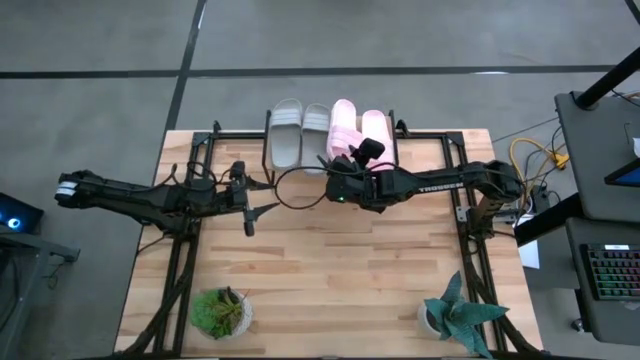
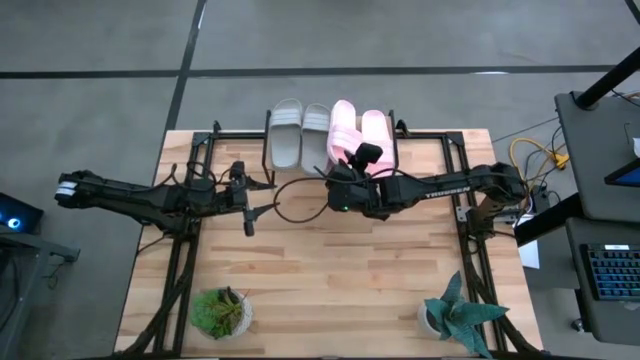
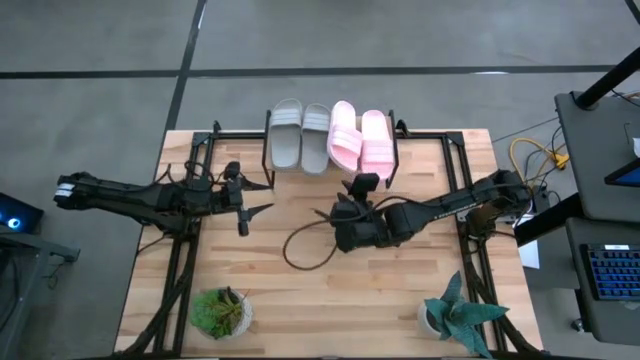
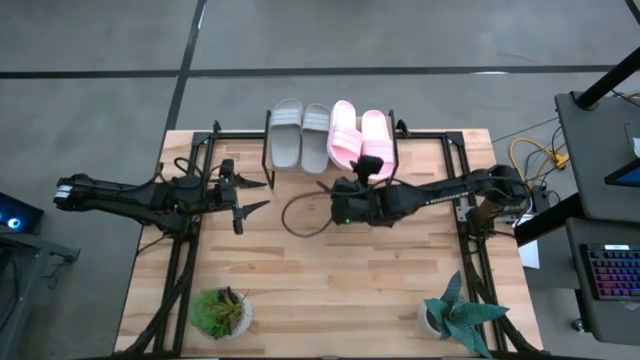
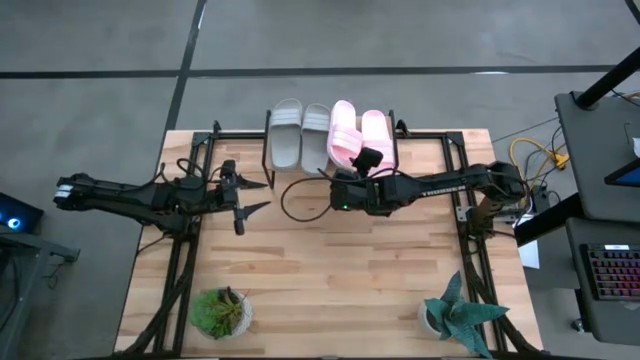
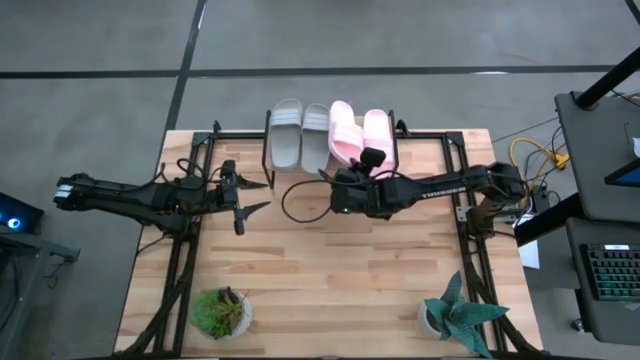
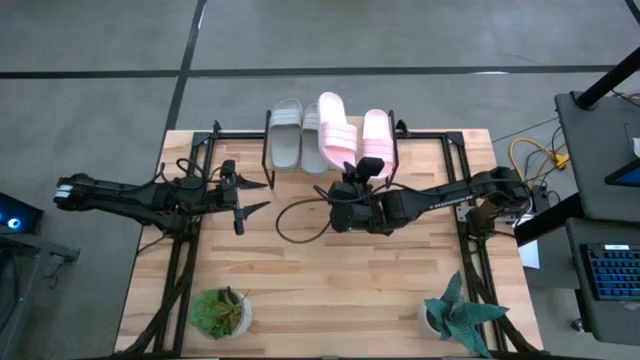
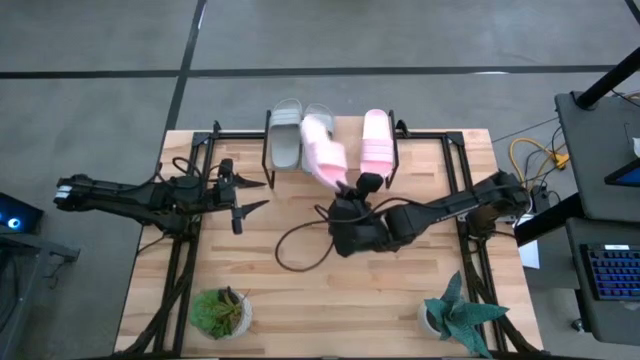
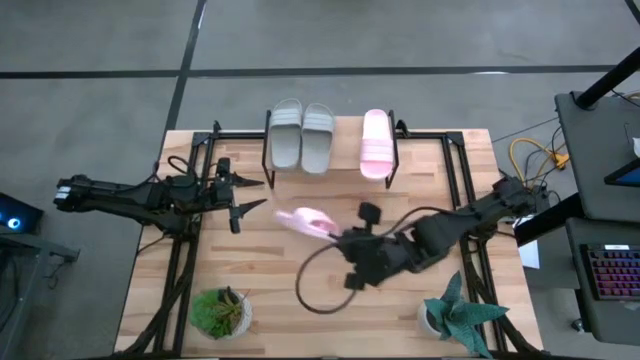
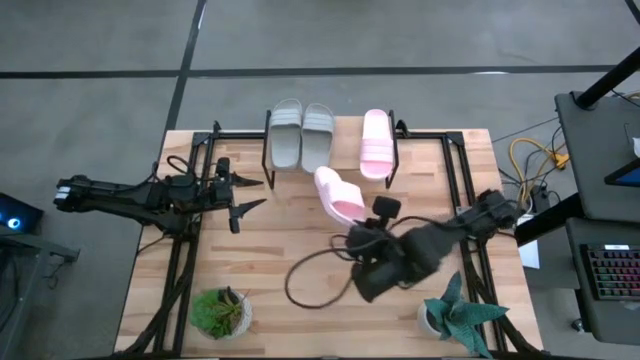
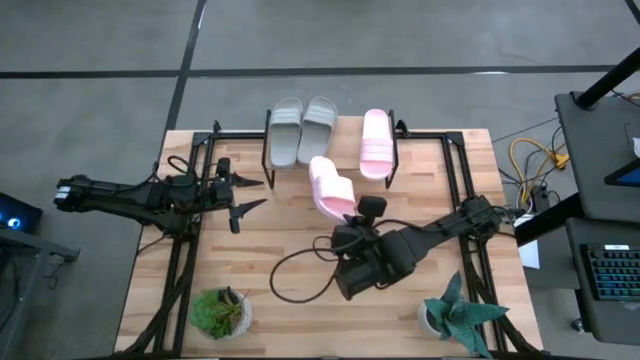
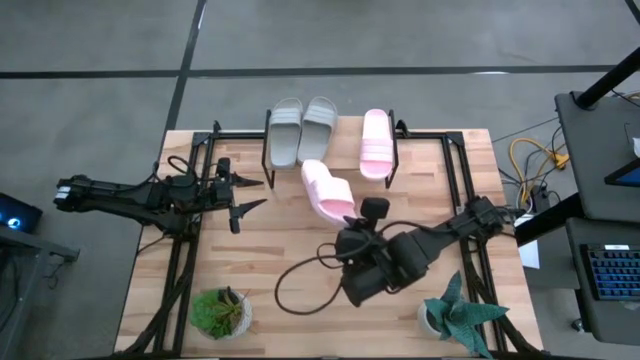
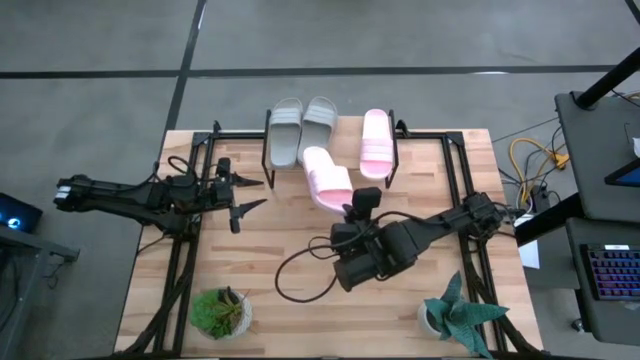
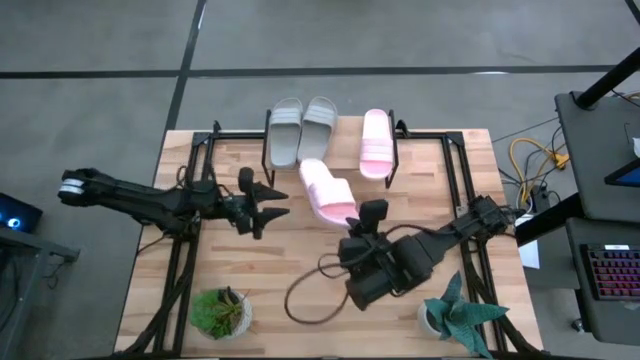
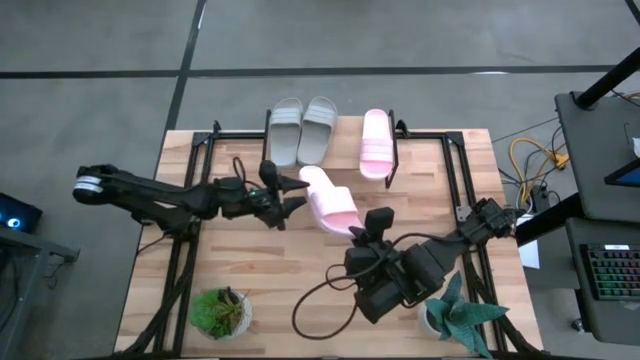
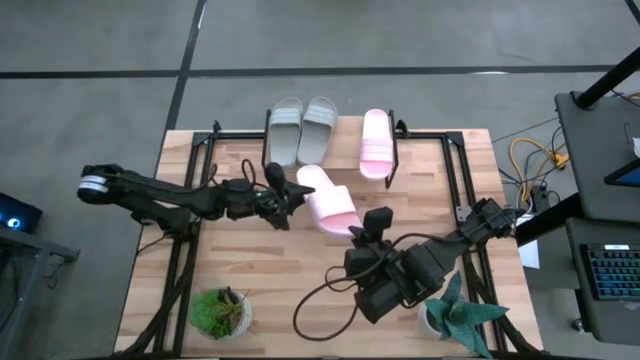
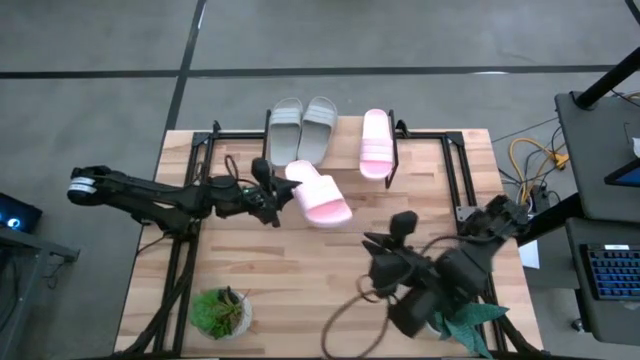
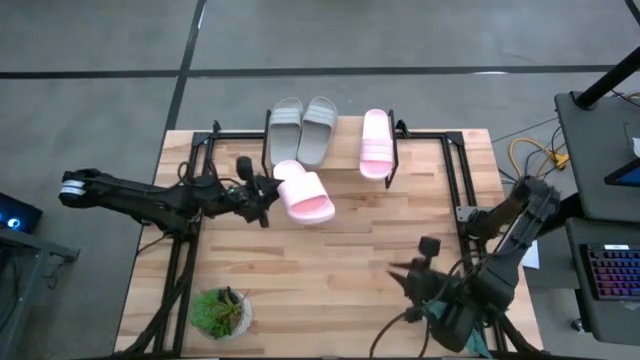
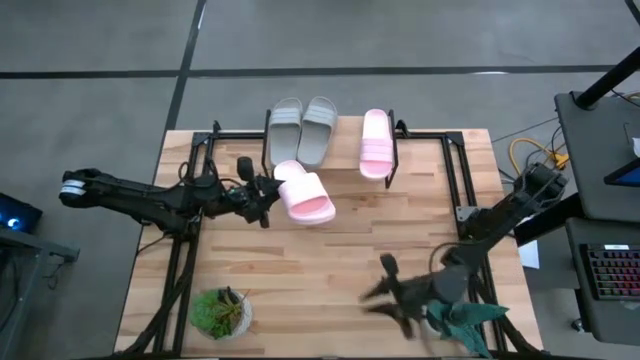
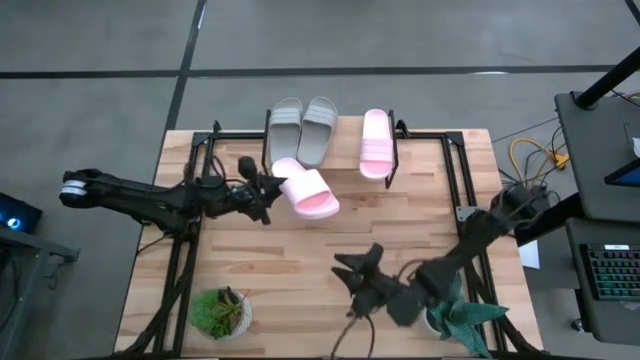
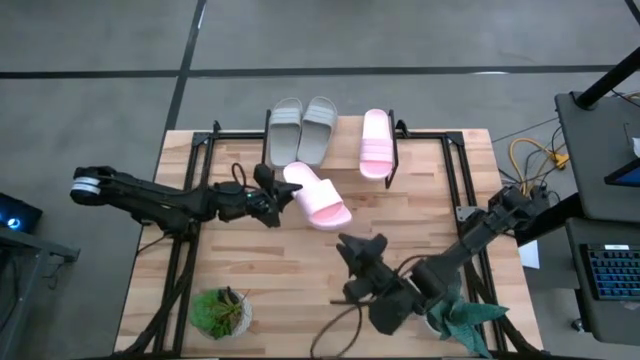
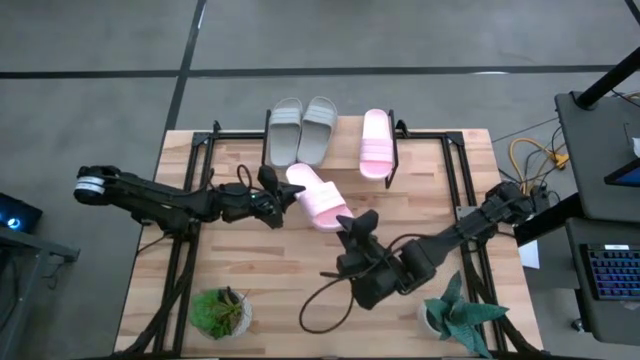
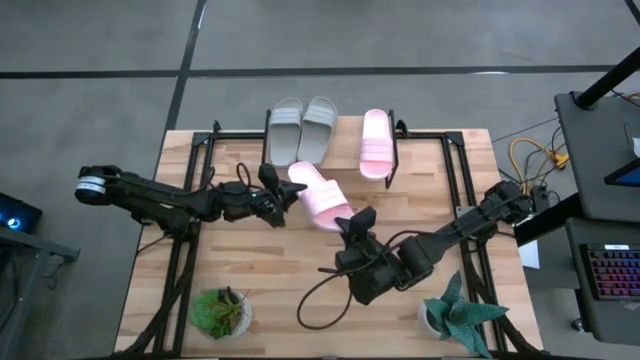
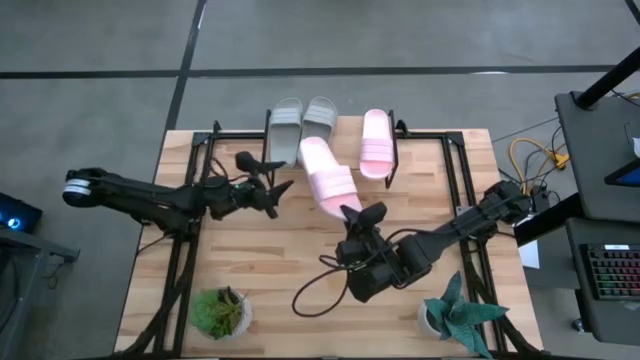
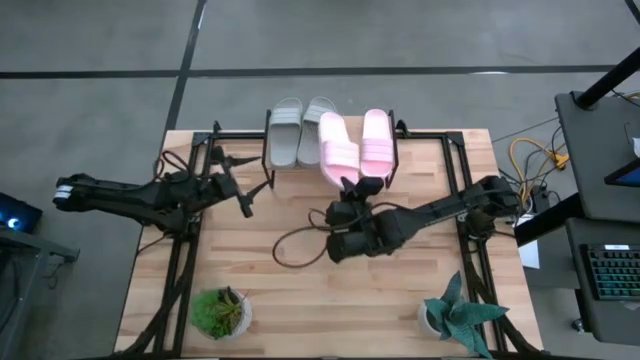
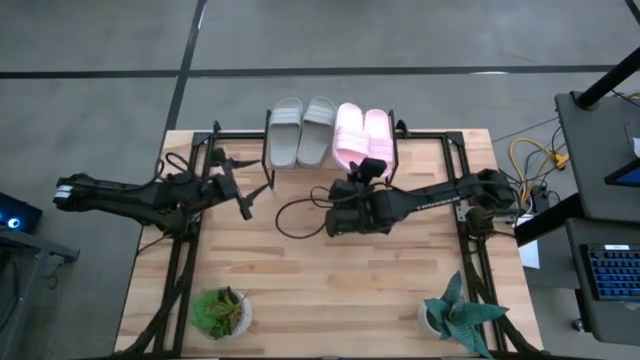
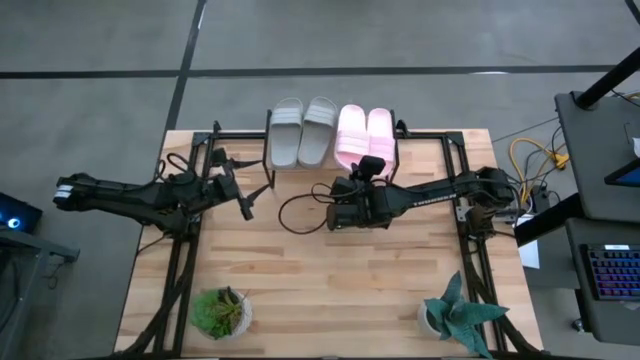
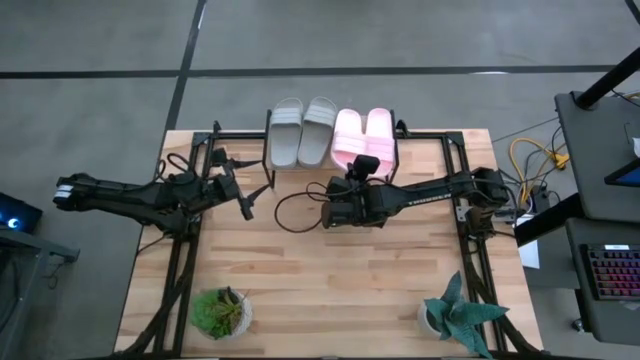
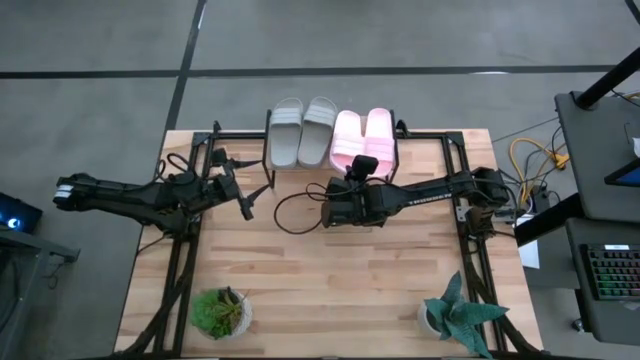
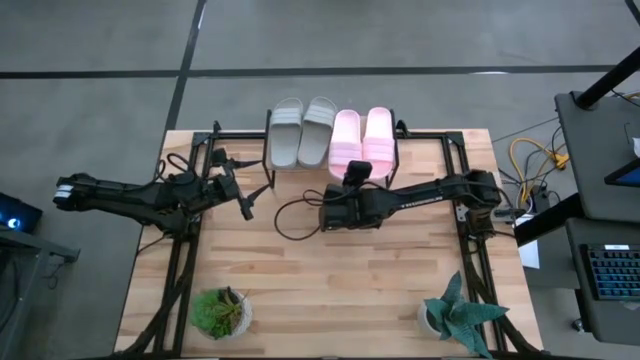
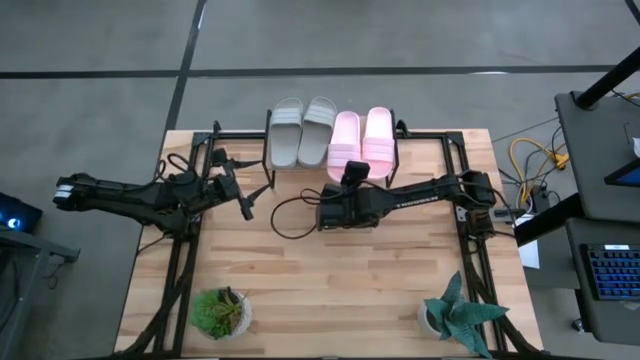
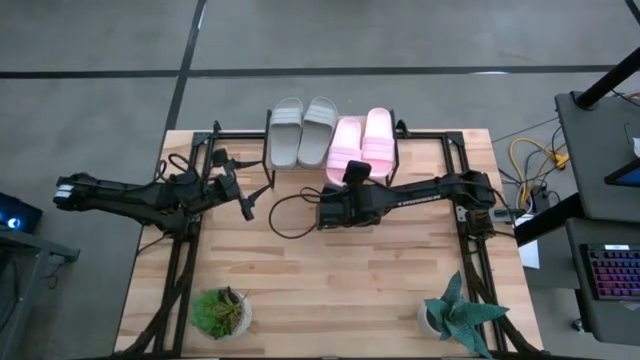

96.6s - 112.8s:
Task: Pick and place slides into the shelf
Put the pink slipper onto the shelf

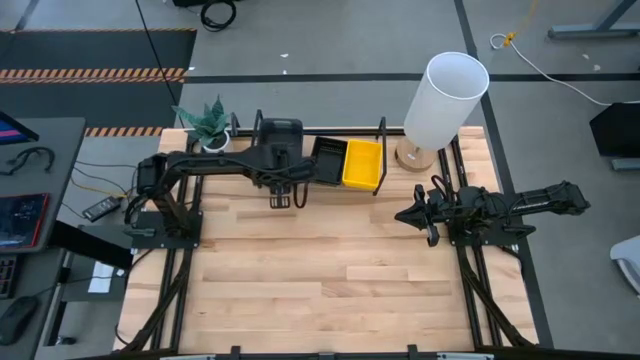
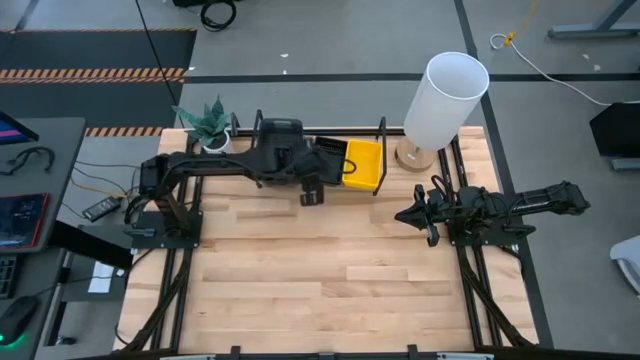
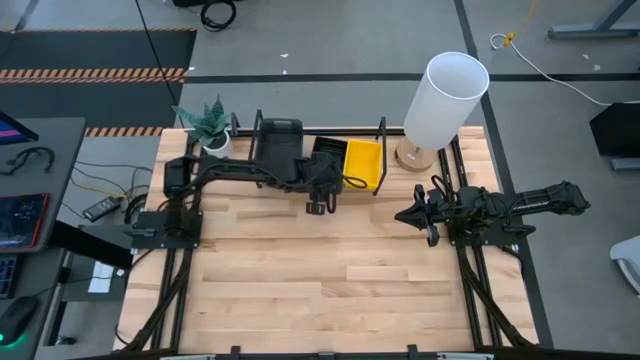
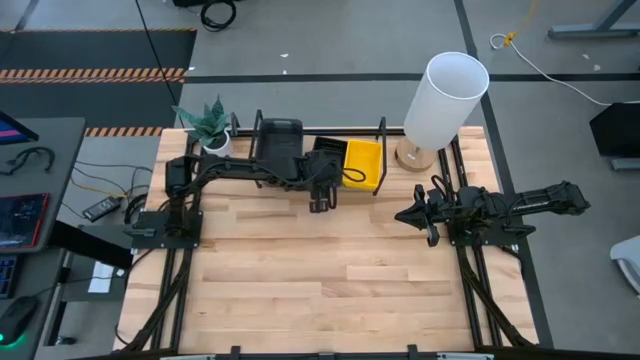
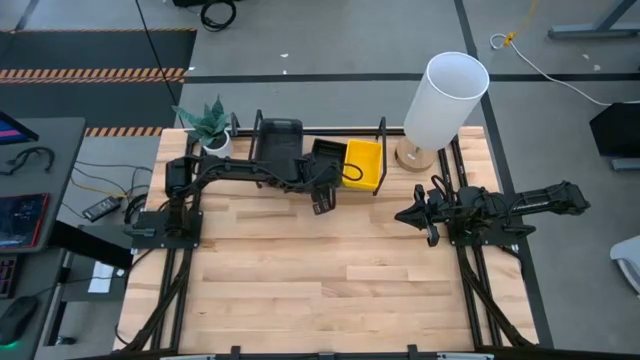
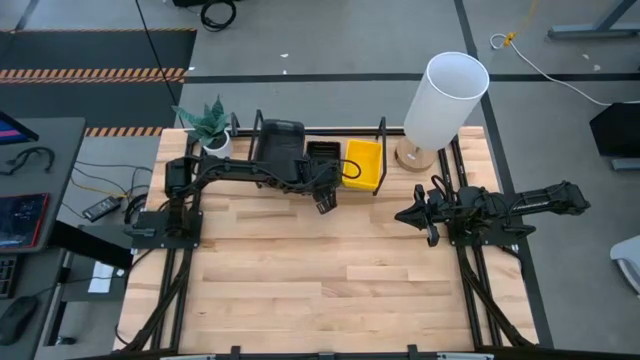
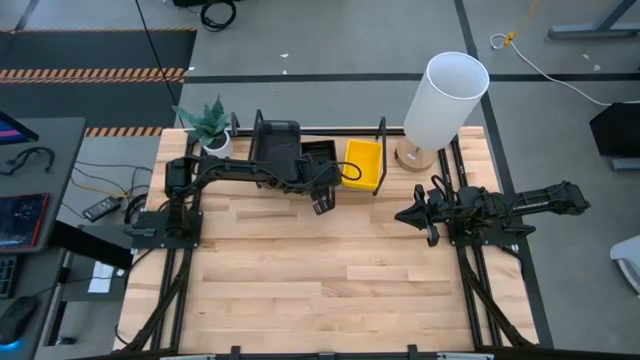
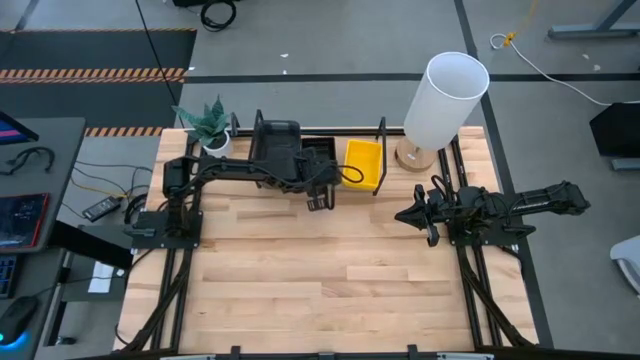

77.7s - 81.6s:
Task: Stack baskets on shelf by color
Adjust the black bin on the shelf
